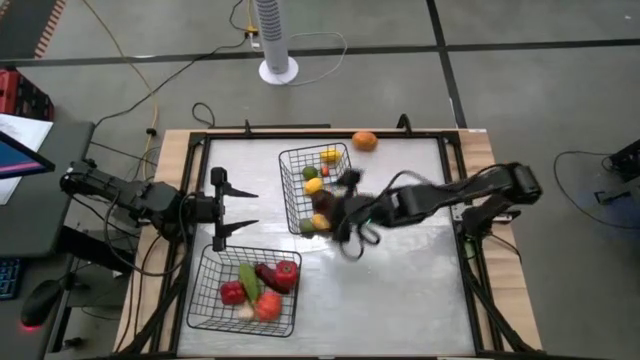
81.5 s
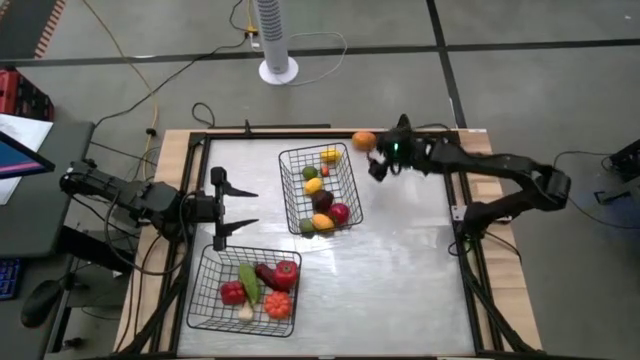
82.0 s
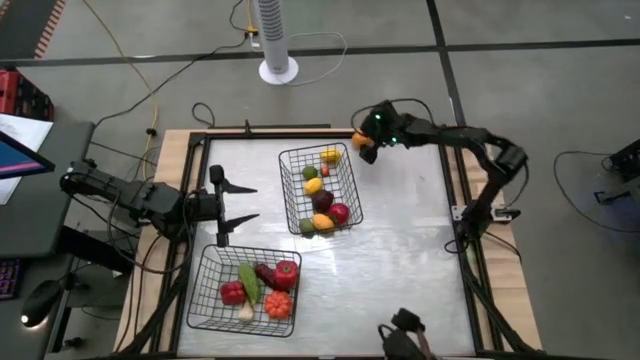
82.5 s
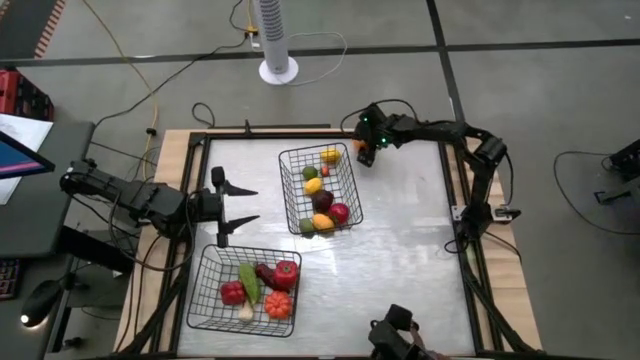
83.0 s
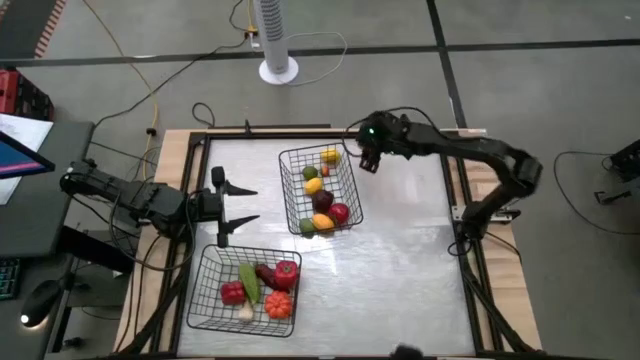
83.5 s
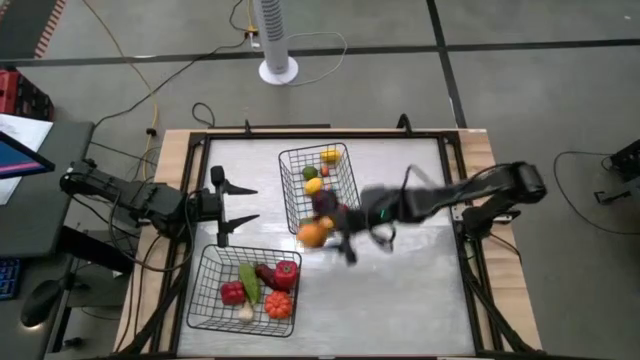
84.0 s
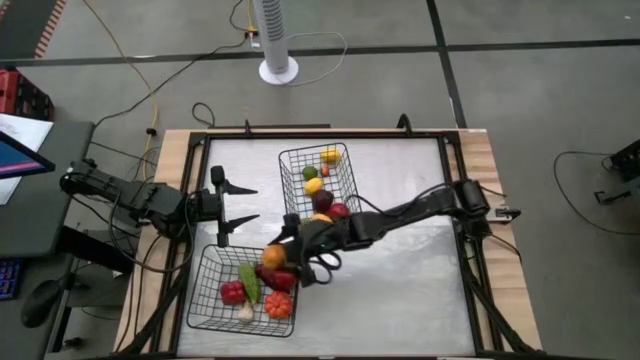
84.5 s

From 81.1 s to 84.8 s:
Task: Sort produce into baskets
Put the brown potato into the bottom black wire basket

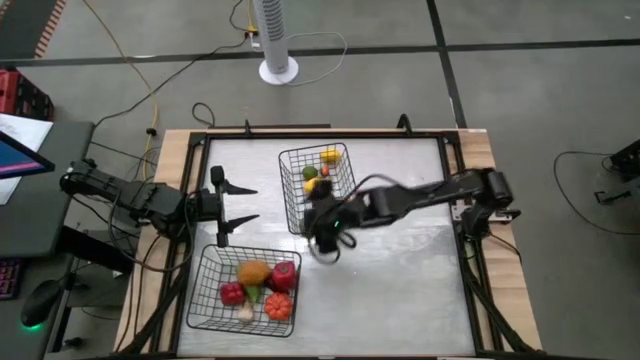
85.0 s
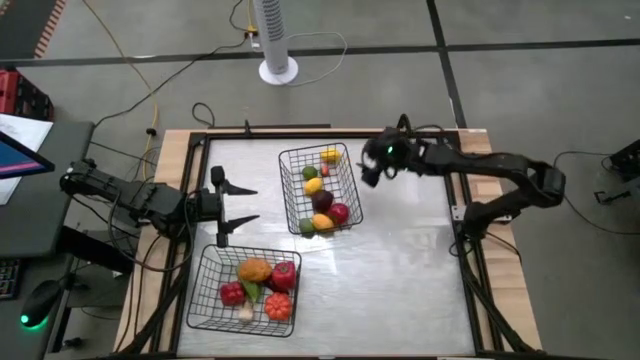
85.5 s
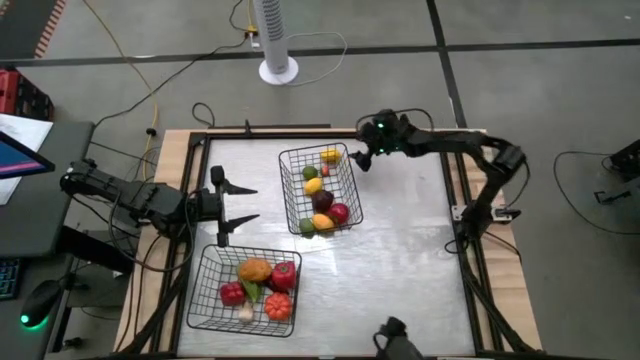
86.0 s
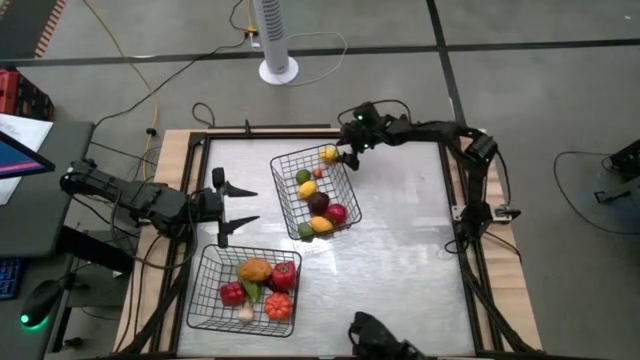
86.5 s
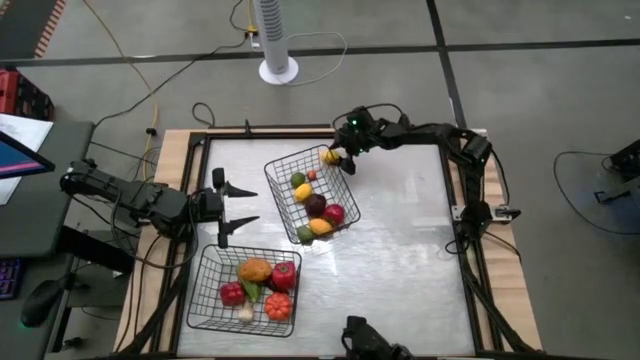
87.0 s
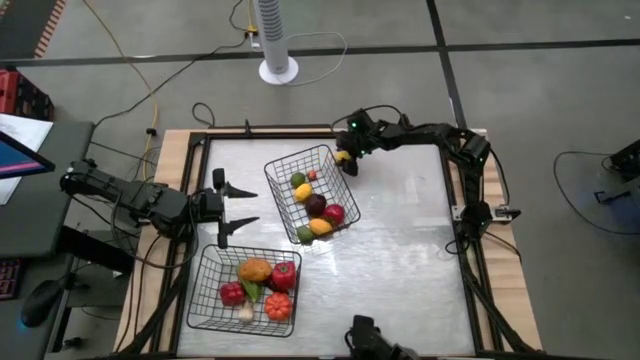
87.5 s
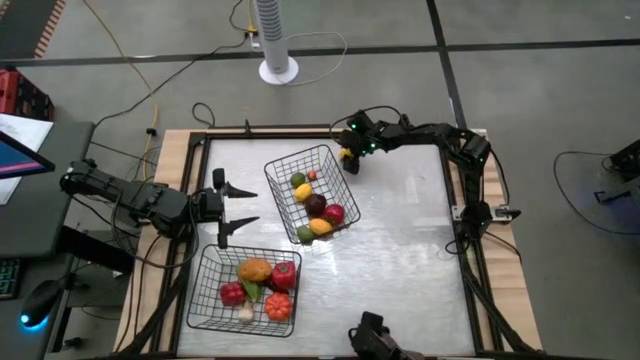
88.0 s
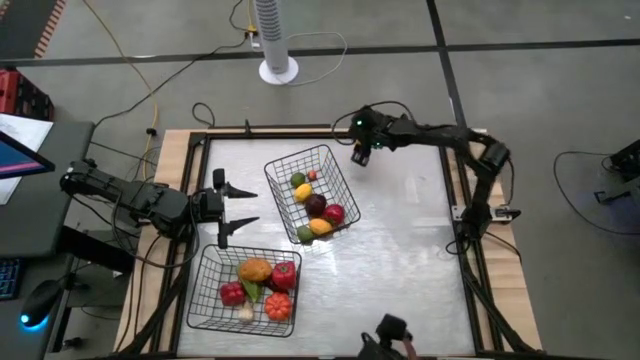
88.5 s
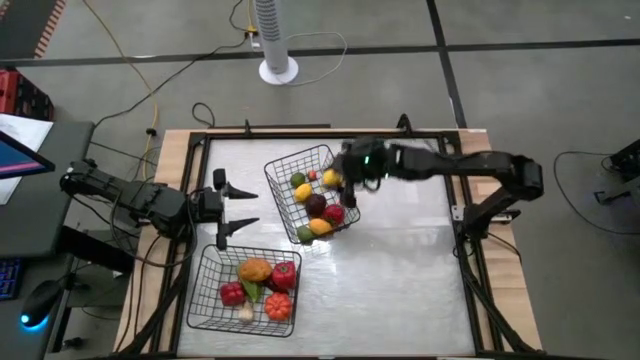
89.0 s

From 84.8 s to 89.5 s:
Put the yellow lemon into the top black wire basket

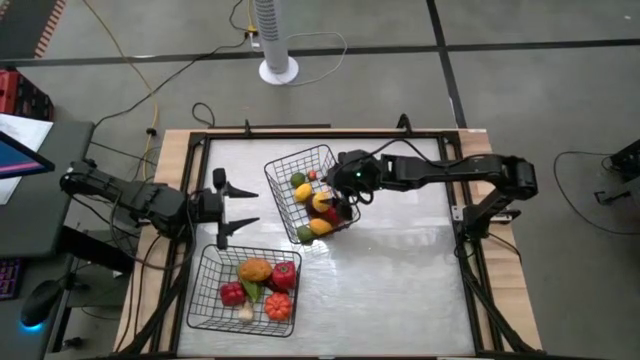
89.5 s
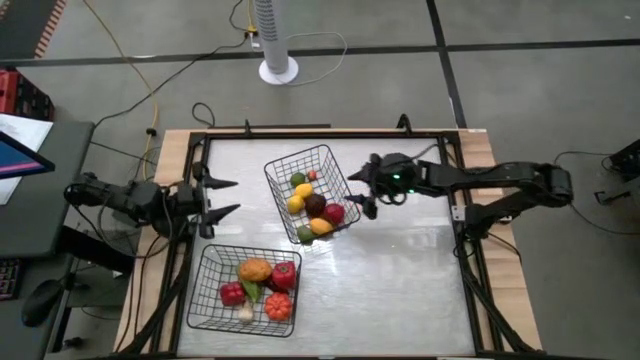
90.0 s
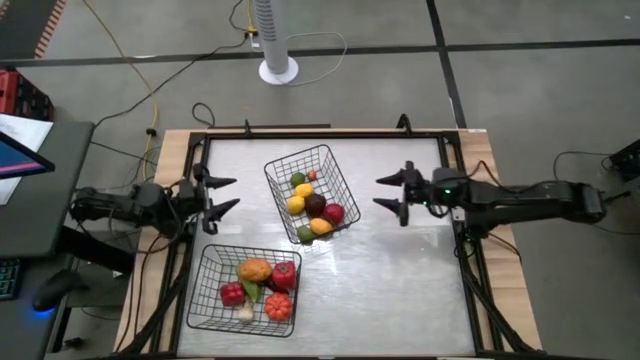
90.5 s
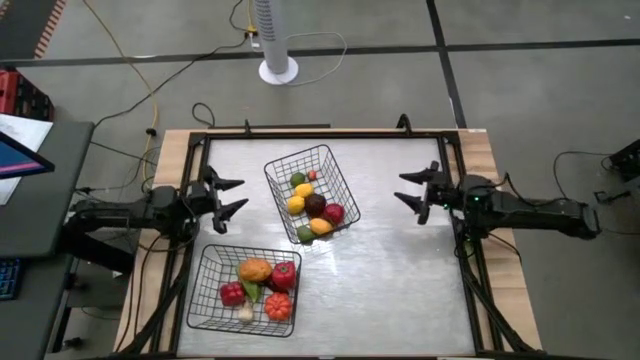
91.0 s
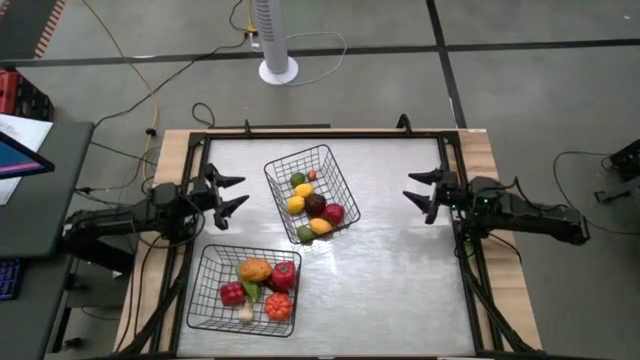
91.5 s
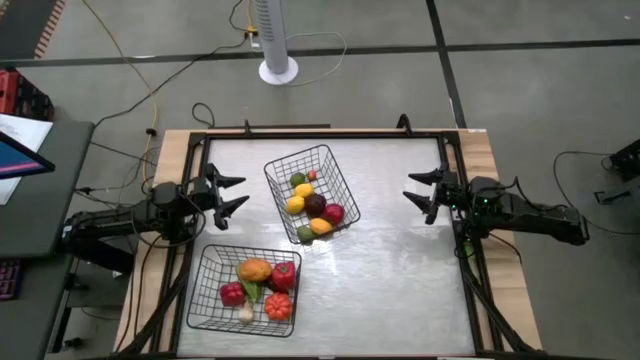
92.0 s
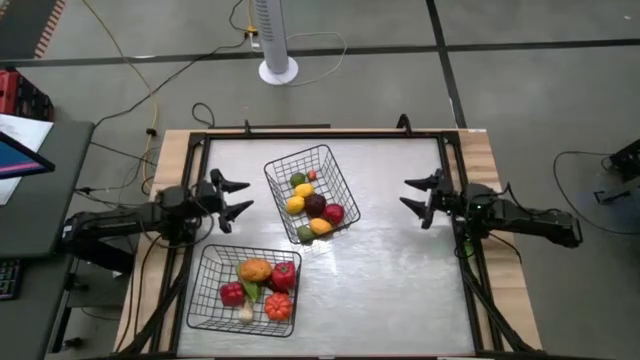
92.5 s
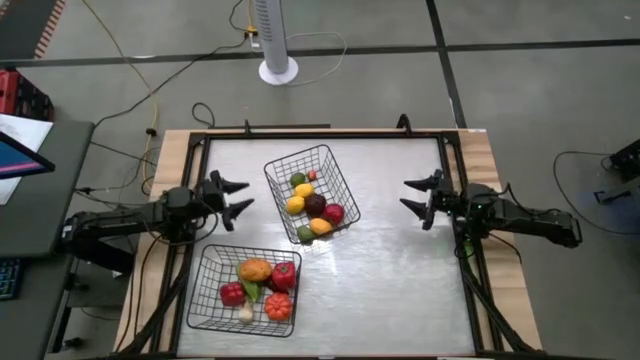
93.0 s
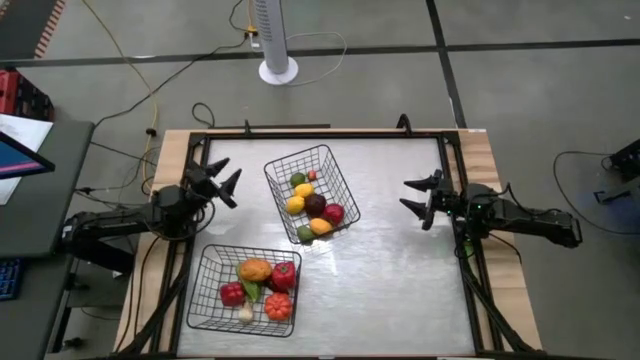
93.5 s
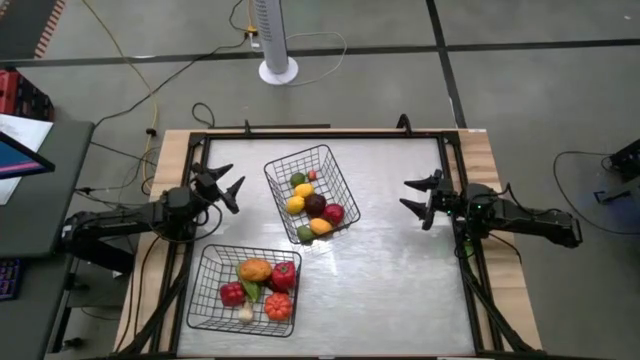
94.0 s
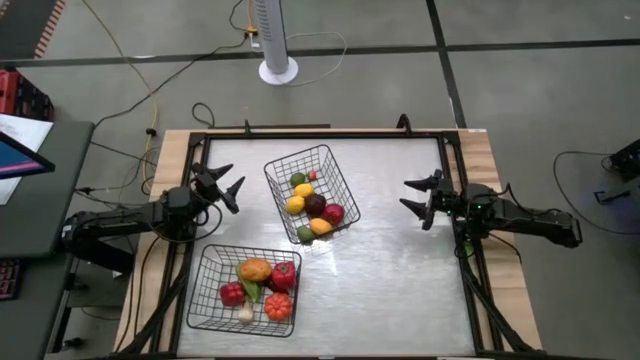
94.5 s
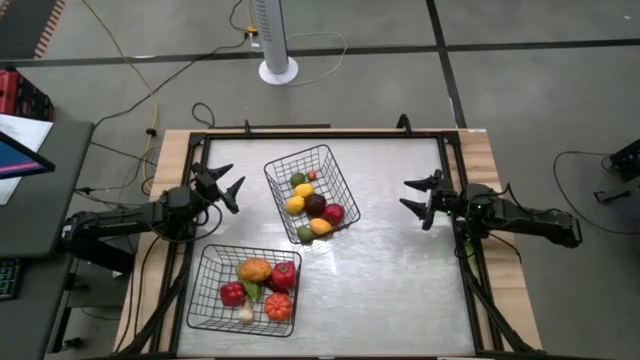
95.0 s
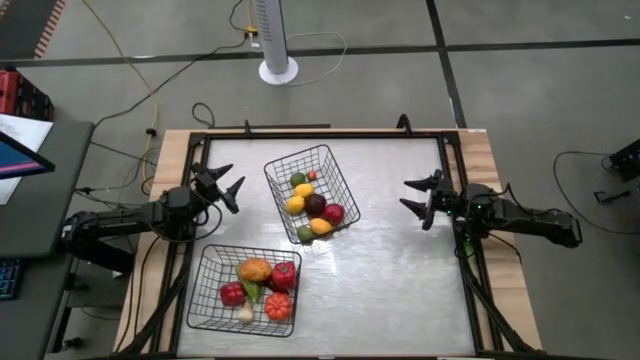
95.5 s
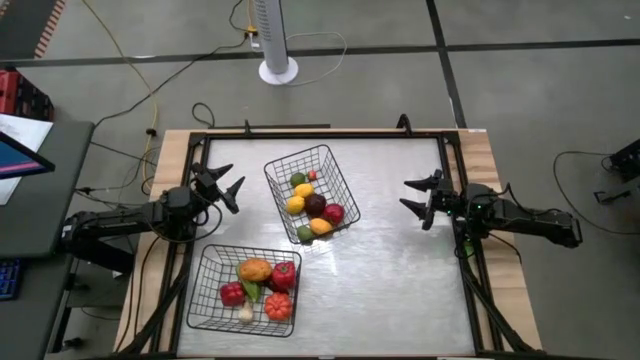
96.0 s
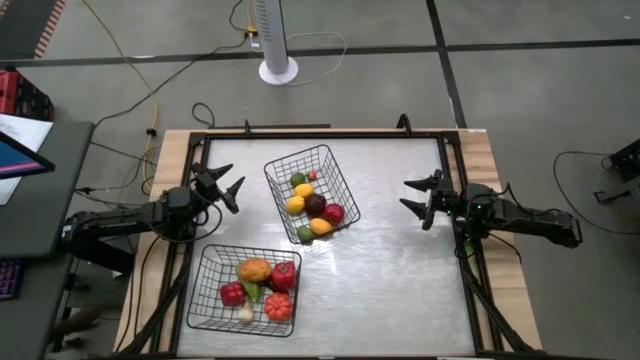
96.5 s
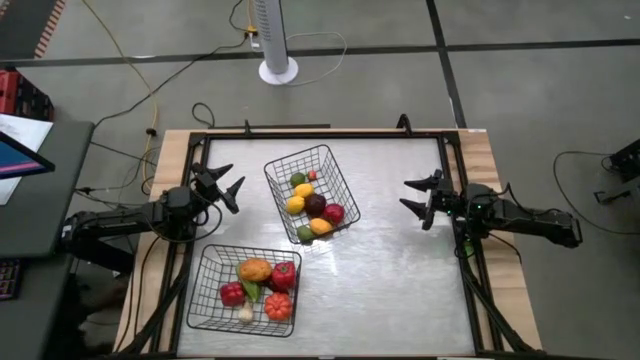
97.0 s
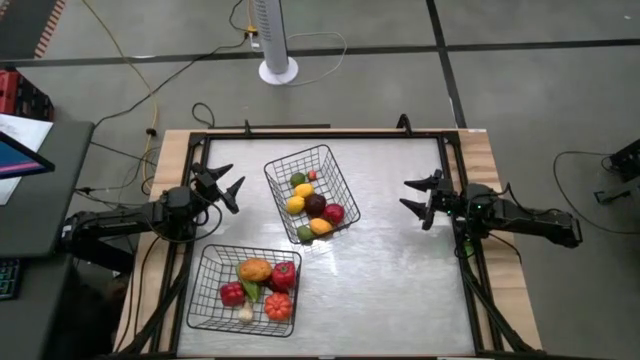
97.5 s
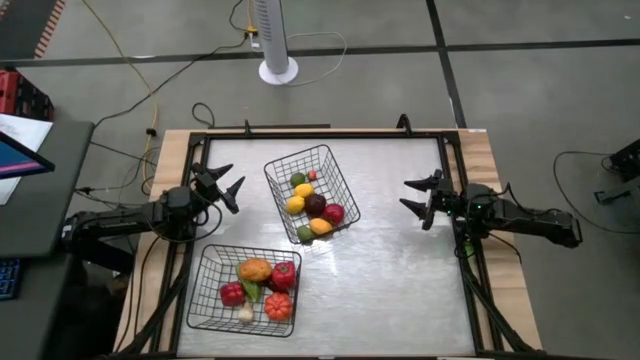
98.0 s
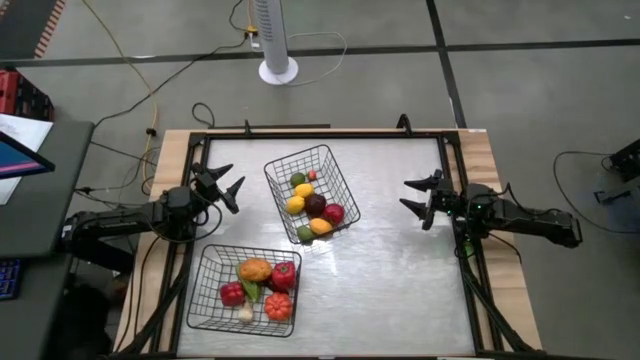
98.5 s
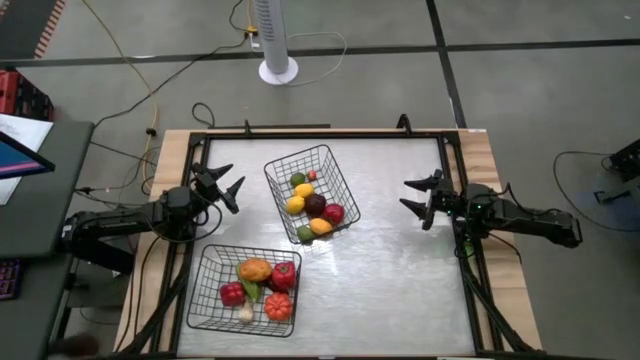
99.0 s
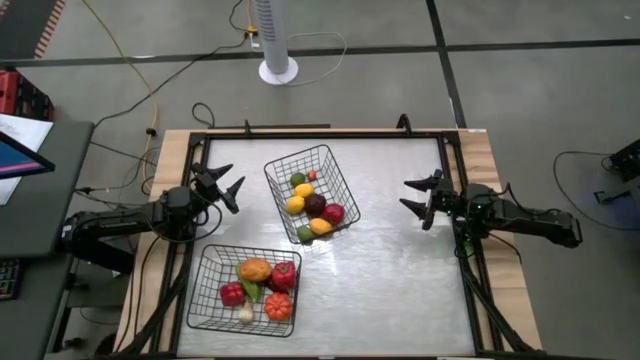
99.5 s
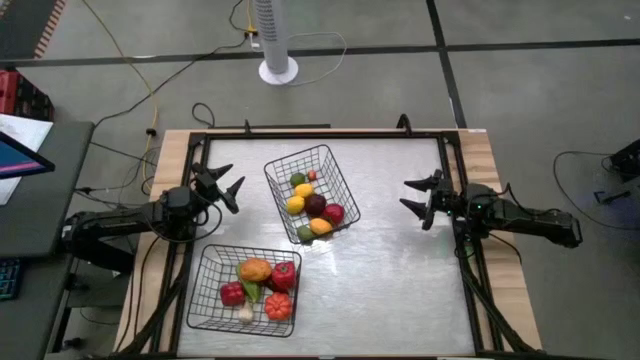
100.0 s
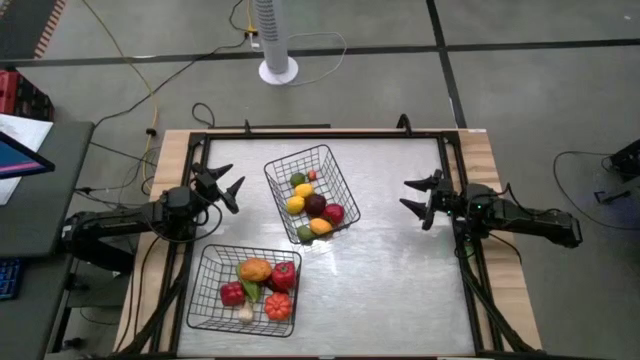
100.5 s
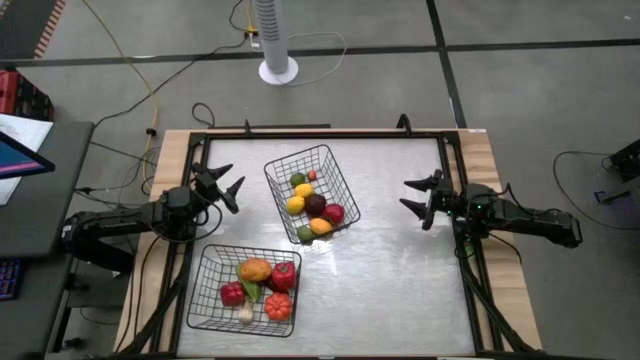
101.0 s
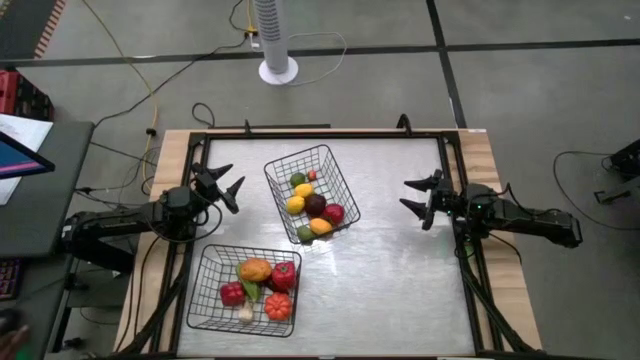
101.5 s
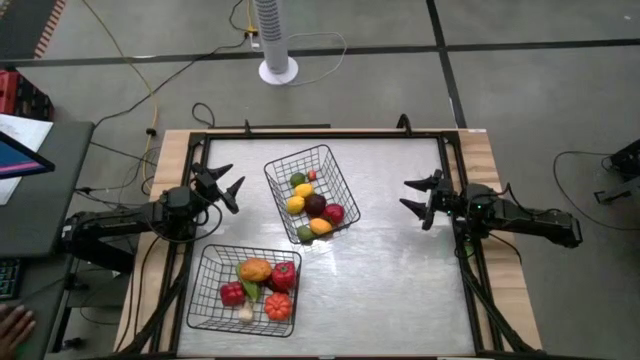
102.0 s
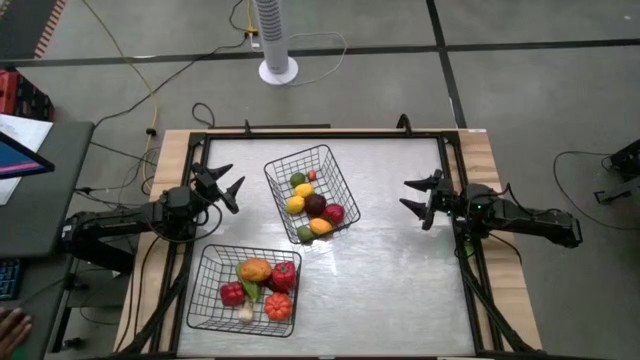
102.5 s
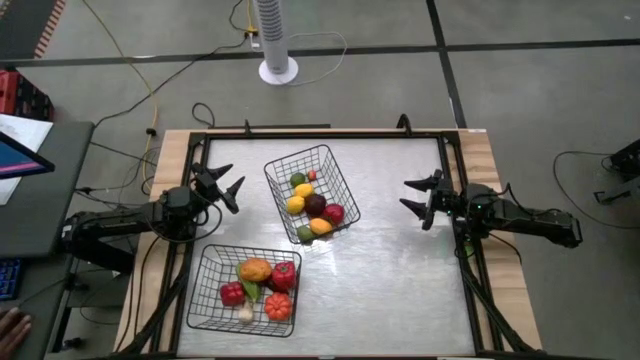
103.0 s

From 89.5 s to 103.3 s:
Return to Home Position
